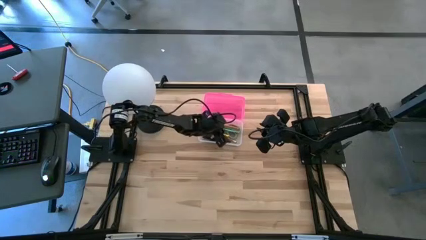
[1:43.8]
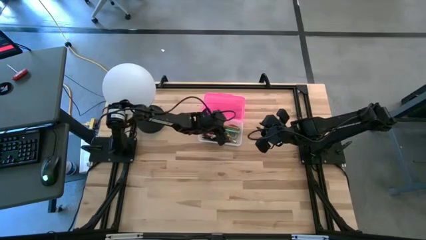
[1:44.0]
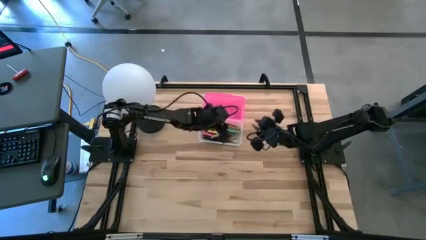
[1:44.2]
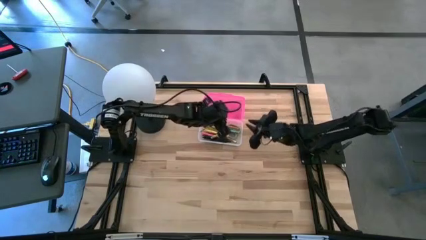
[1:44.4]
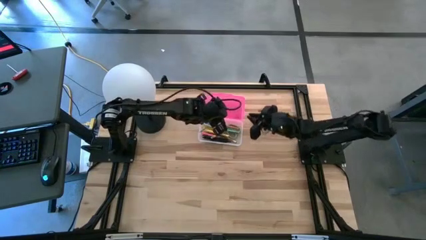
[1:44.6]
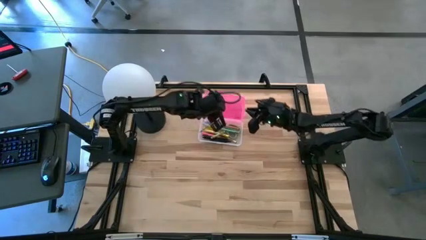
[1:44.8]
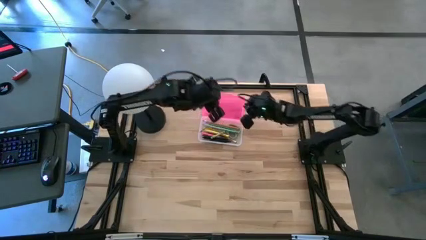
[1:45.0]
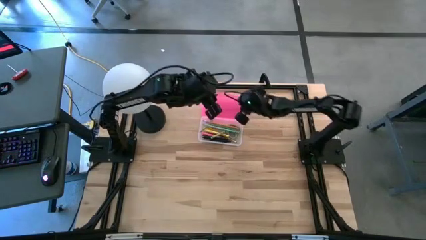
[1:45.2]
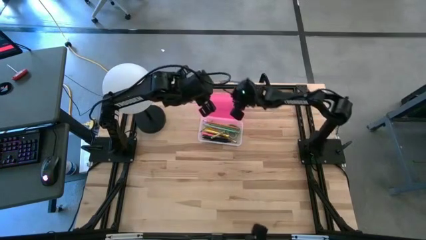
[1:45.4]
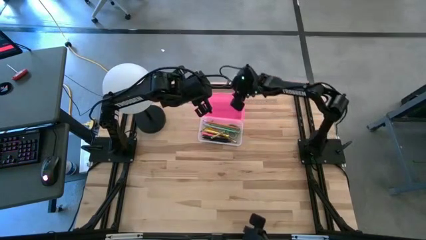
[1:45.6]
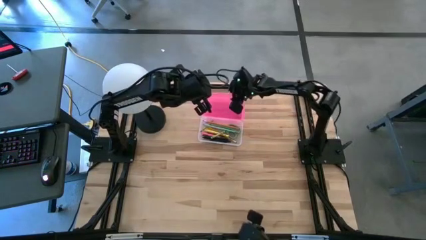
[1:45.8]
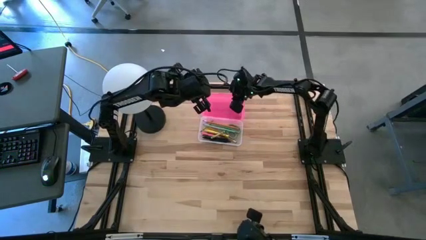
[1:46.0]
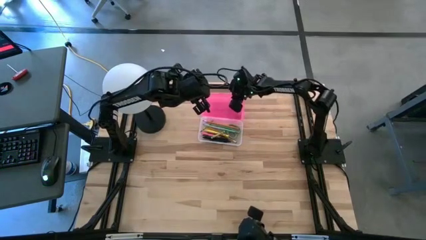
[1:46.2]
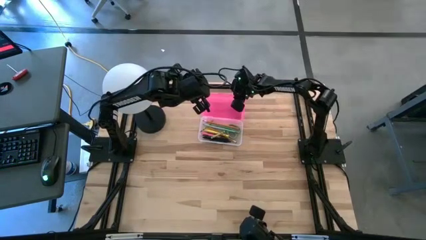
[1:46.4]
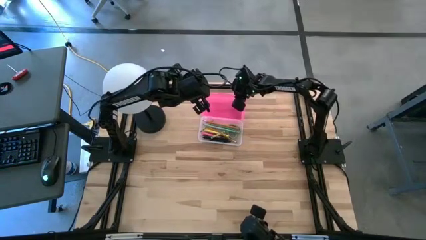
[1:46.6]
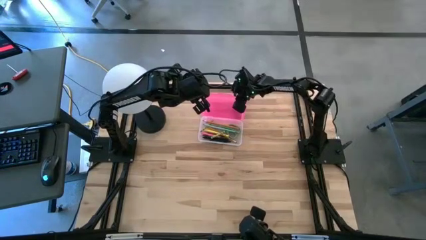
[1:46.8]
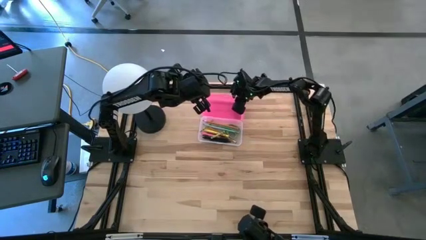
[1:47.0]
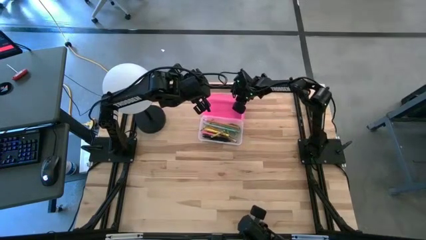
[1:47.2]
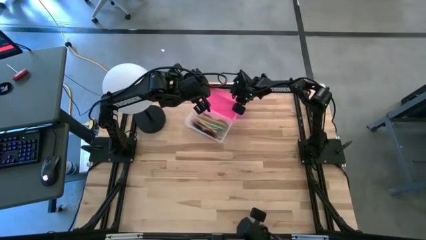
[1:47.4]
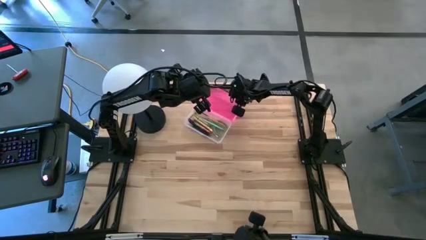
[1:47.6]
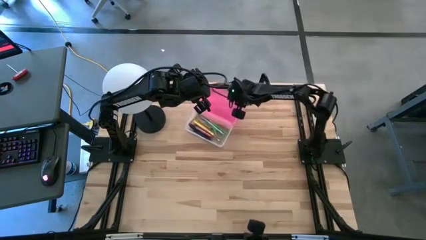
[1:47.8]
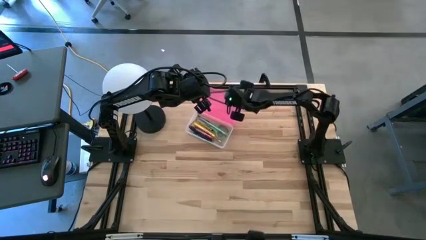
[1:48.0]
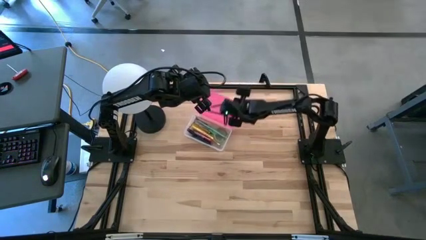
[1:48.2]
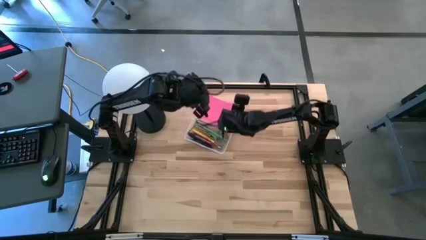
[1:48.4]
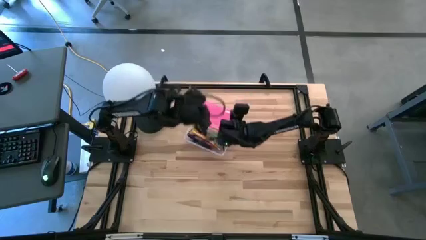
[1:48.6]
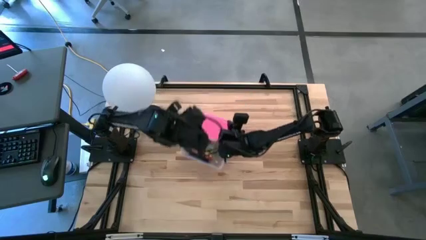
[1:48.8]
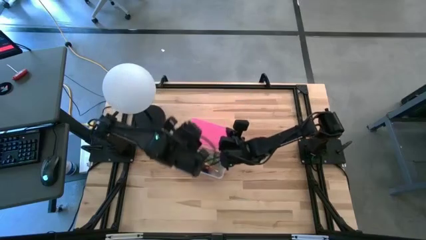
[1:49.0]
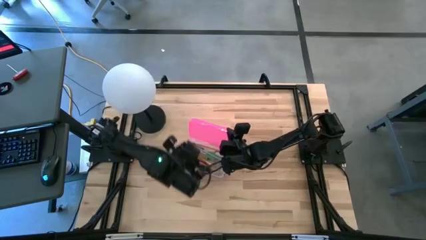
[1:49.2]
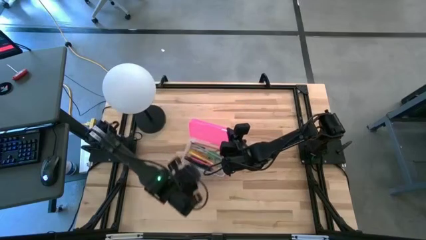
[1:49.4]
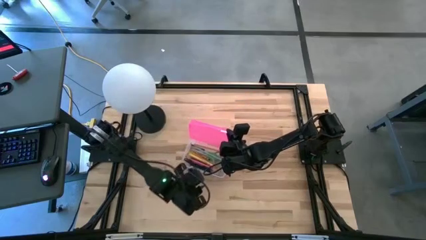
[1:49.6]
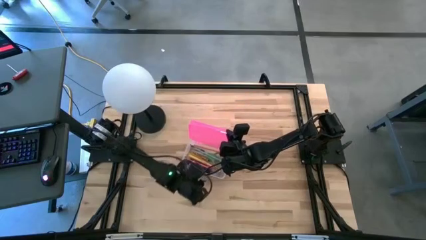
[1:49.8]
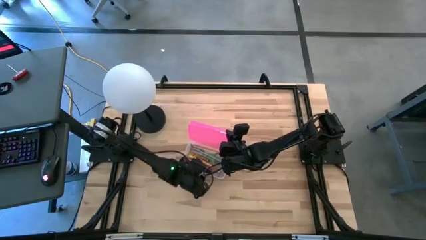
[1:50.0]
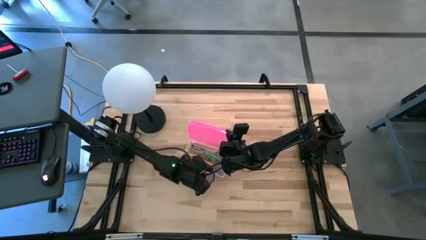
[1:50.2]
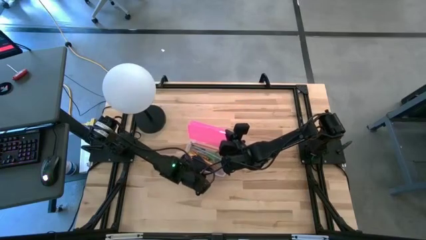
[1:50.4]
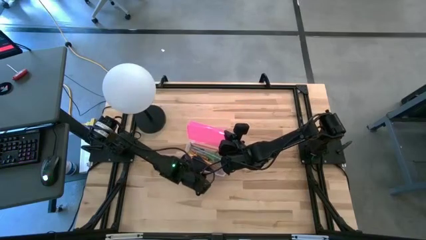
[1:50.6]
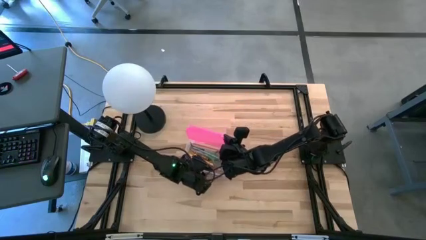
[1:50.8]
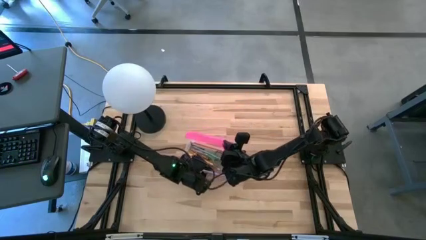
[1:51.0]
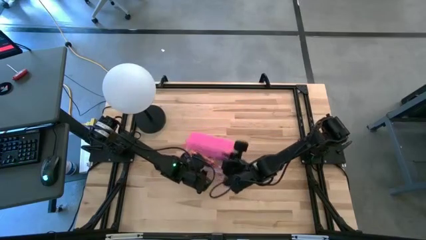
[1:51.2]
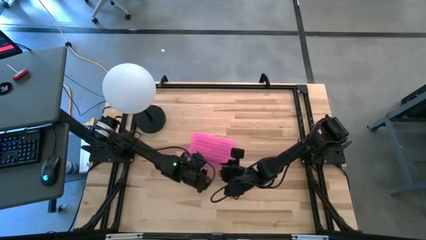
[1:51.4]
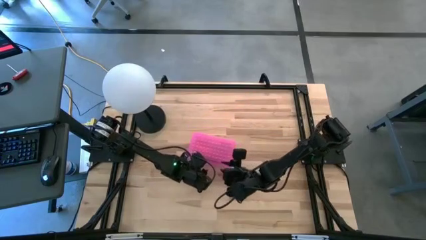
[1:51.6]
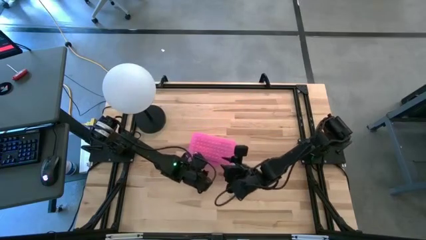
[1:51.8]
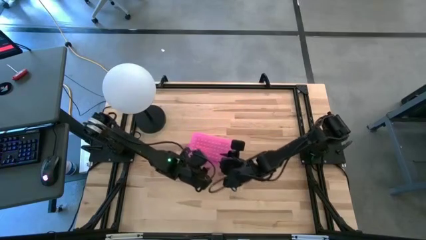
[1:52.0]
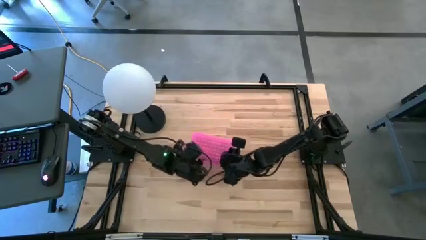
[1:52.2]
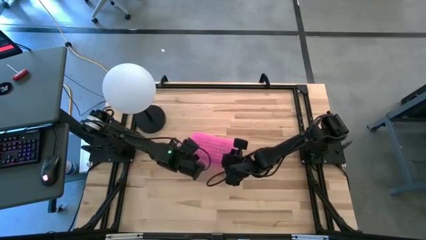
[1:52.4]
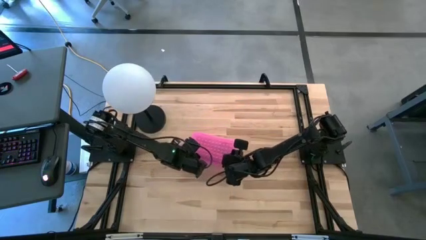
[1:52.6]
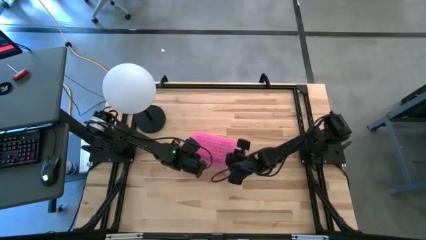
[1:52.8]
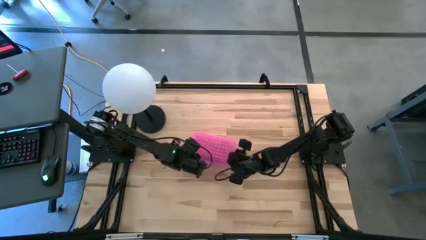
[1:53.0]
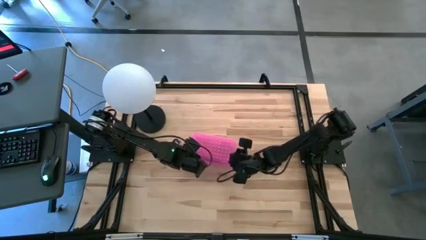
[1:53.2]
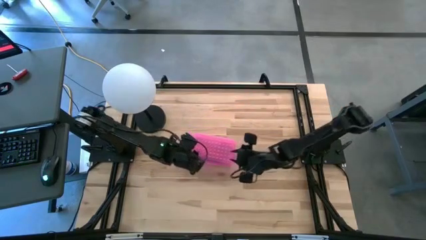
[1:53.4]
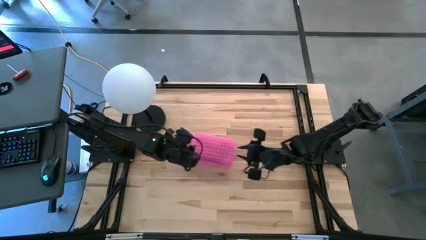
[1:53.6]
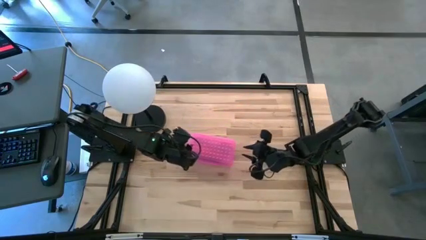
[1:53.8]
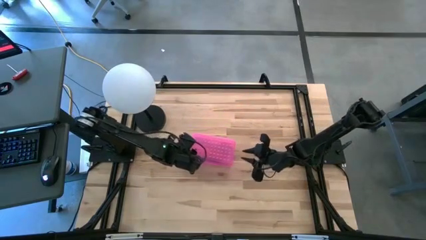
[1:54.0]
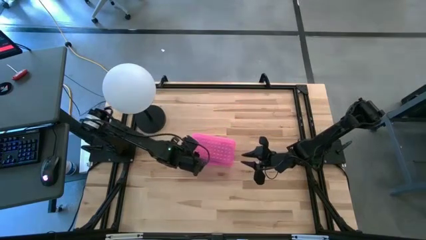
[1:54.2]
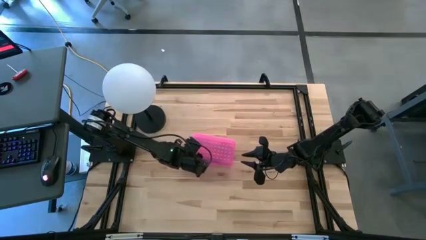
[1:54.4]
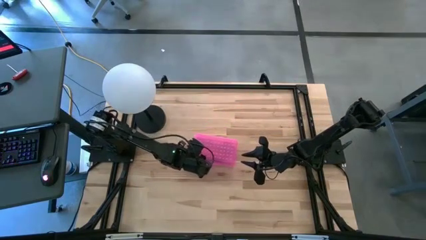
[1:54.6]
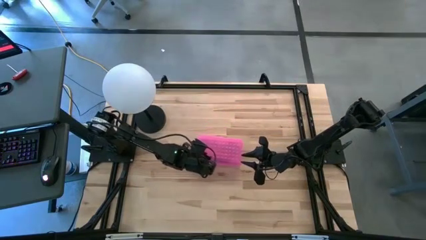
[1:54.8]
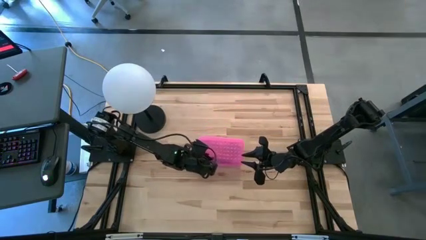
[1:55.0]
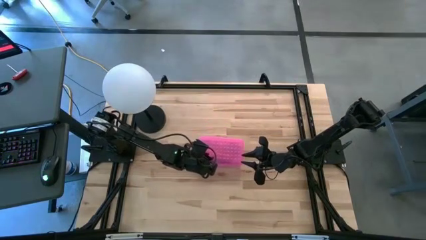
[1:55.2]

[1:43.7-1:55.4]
Task: Pick & place school supplies into a supply box
Close the pink supply box
